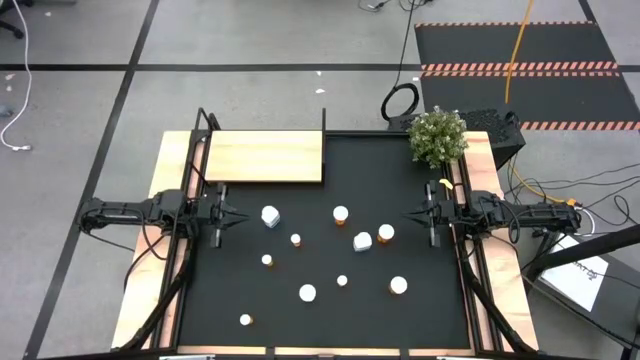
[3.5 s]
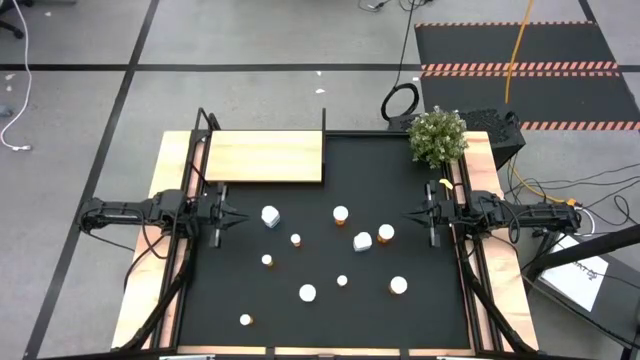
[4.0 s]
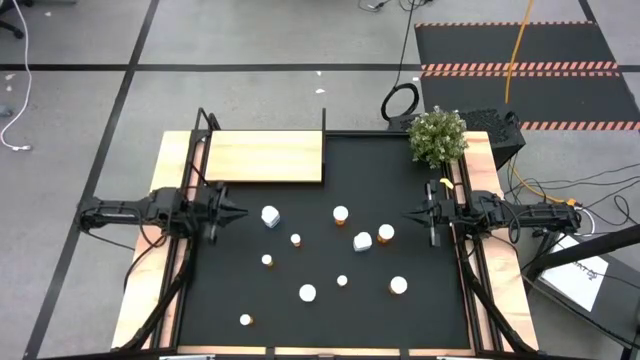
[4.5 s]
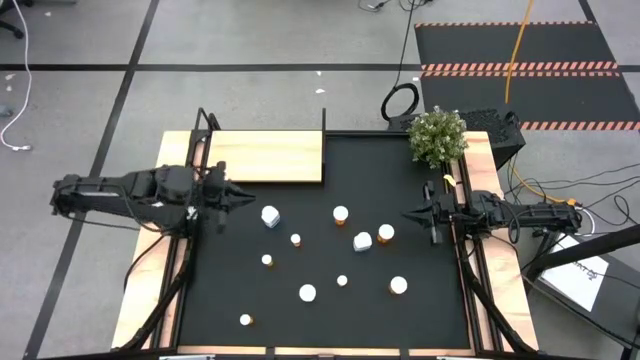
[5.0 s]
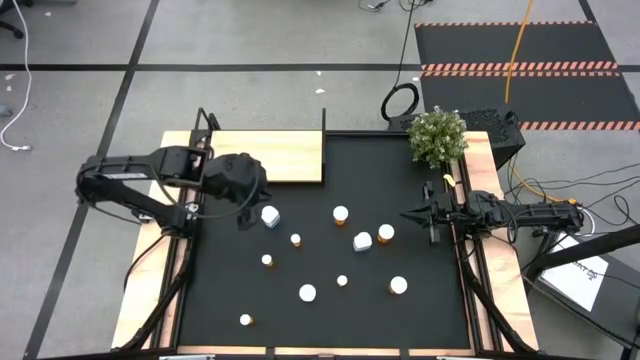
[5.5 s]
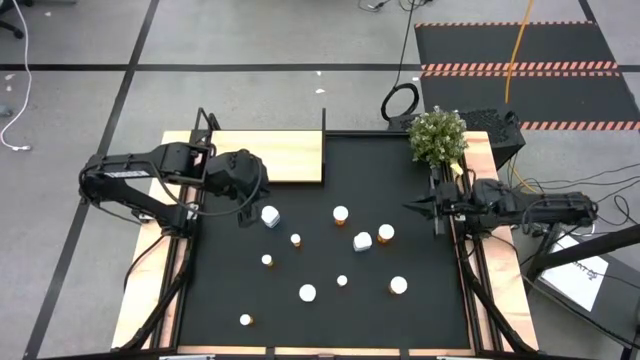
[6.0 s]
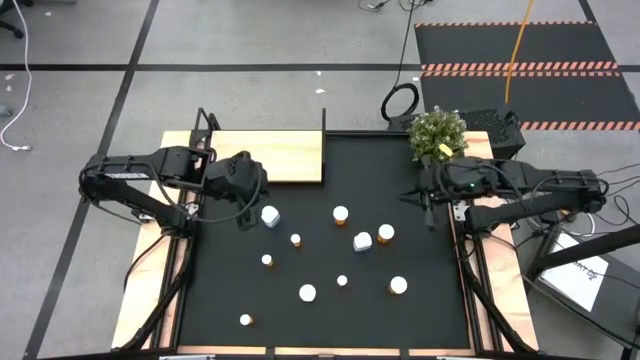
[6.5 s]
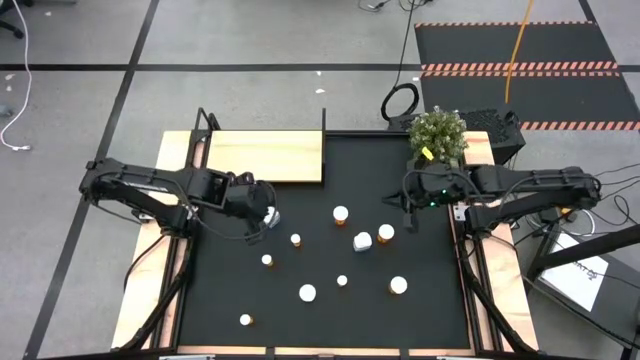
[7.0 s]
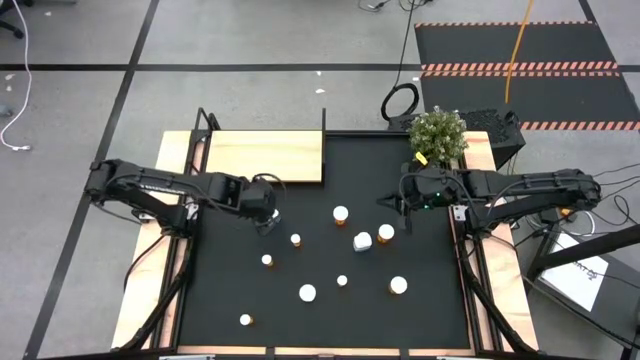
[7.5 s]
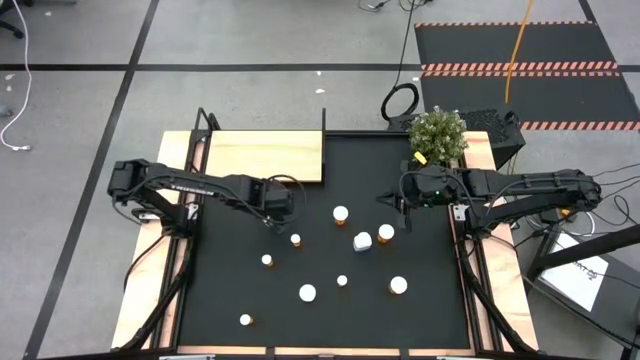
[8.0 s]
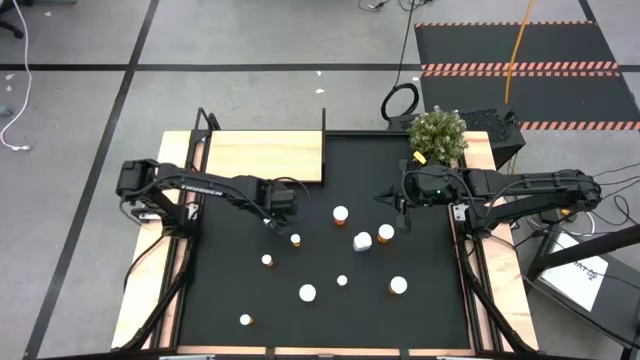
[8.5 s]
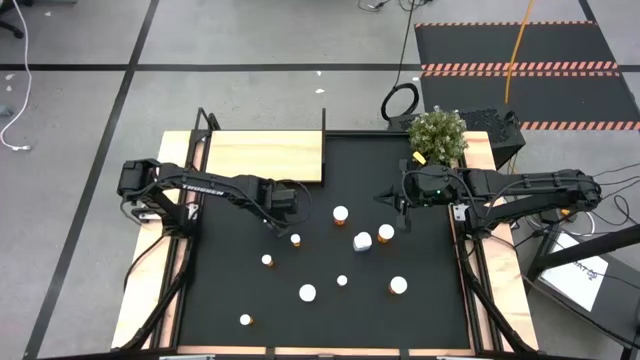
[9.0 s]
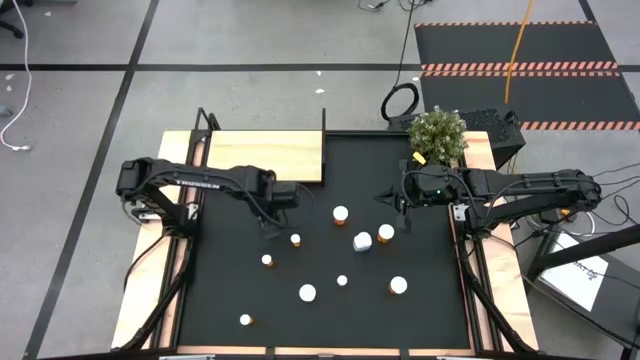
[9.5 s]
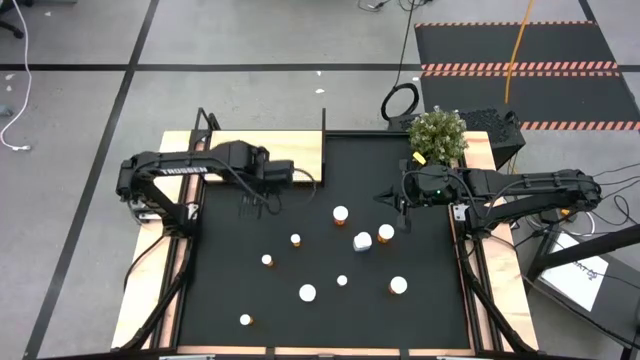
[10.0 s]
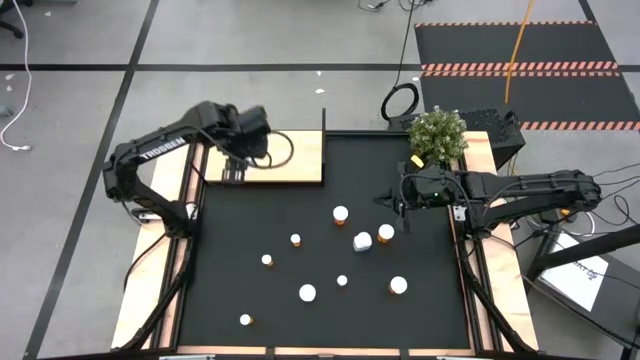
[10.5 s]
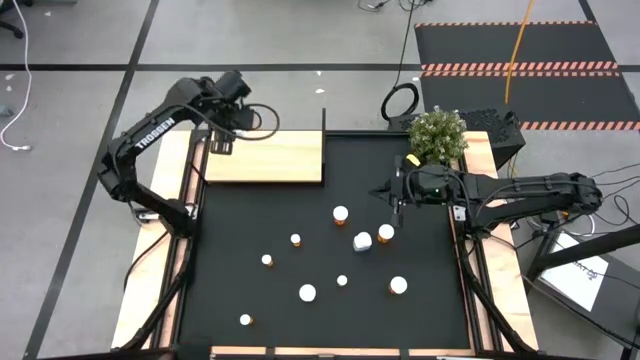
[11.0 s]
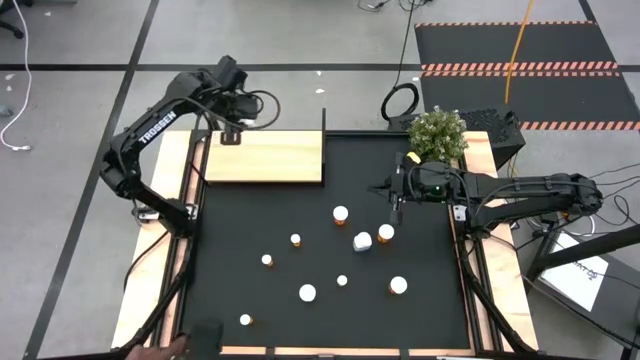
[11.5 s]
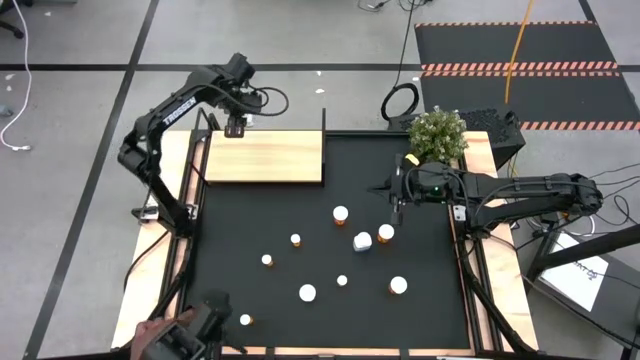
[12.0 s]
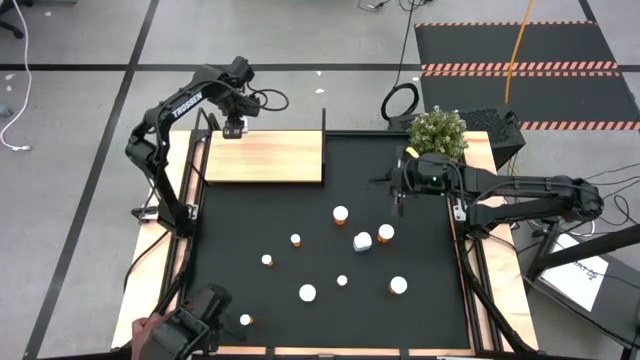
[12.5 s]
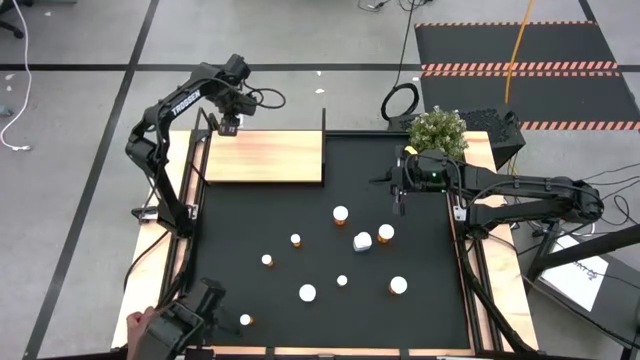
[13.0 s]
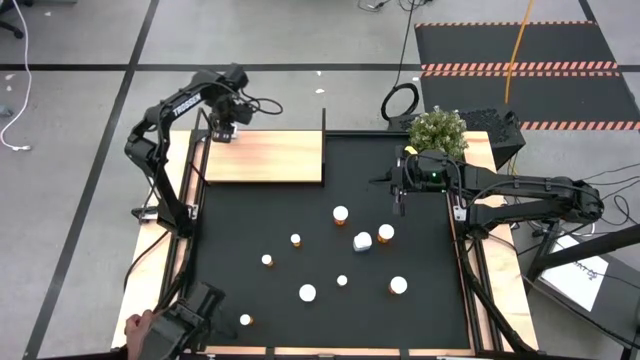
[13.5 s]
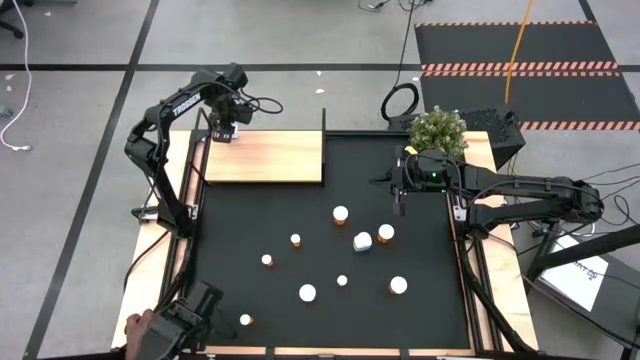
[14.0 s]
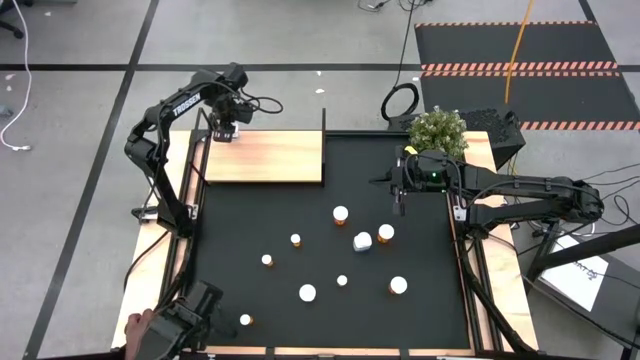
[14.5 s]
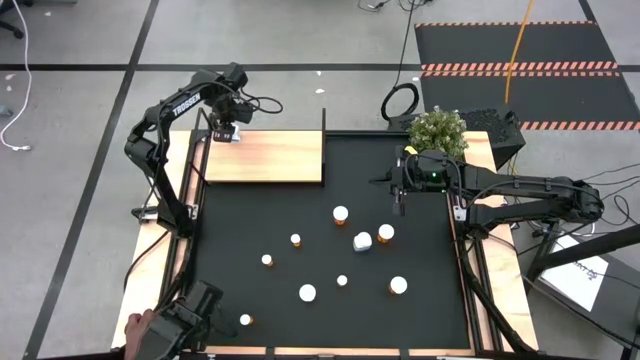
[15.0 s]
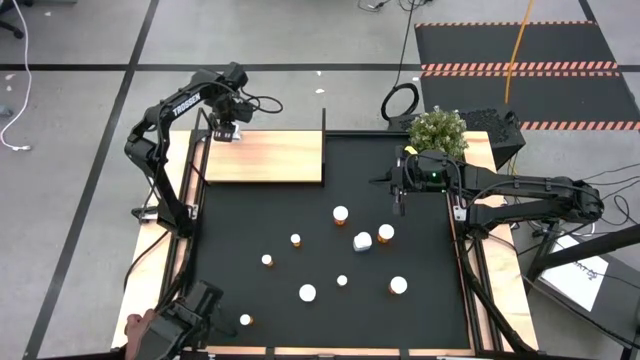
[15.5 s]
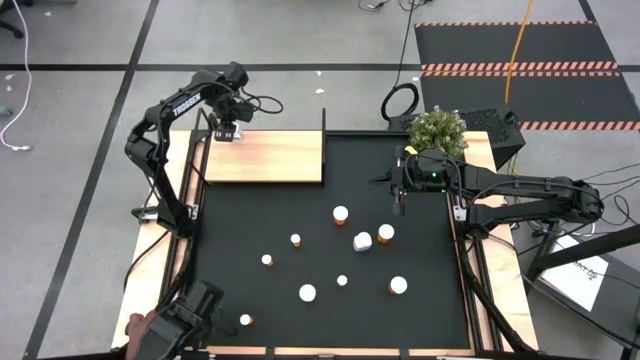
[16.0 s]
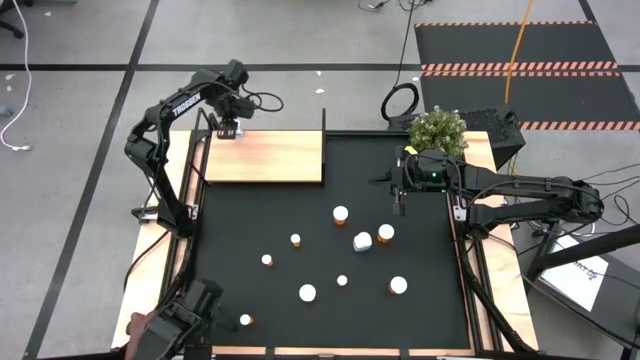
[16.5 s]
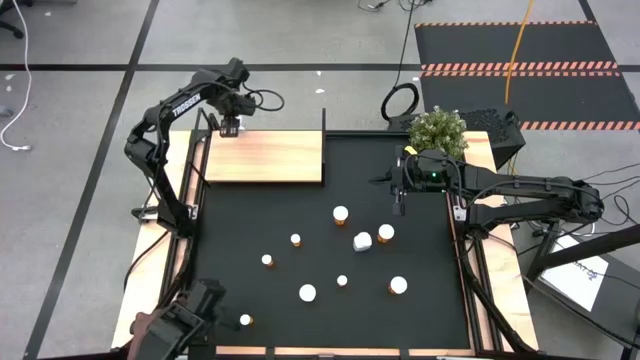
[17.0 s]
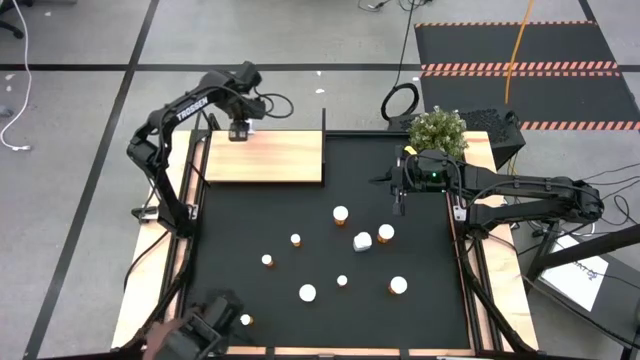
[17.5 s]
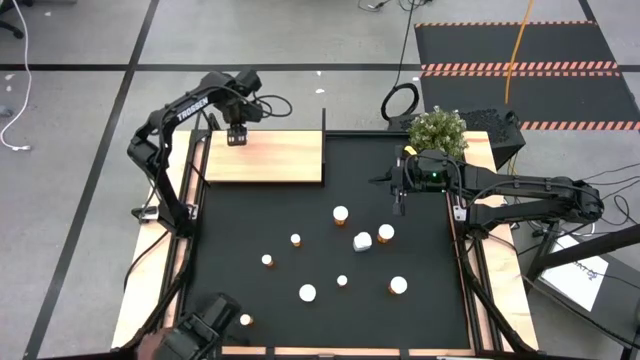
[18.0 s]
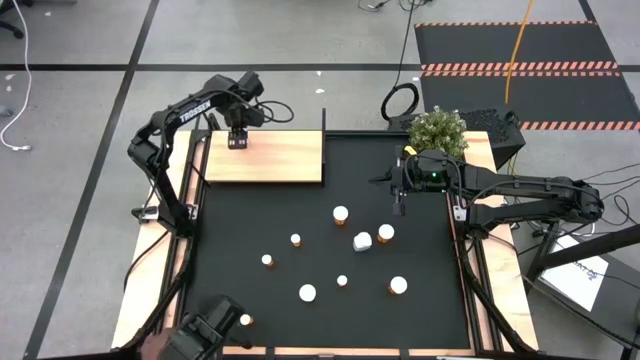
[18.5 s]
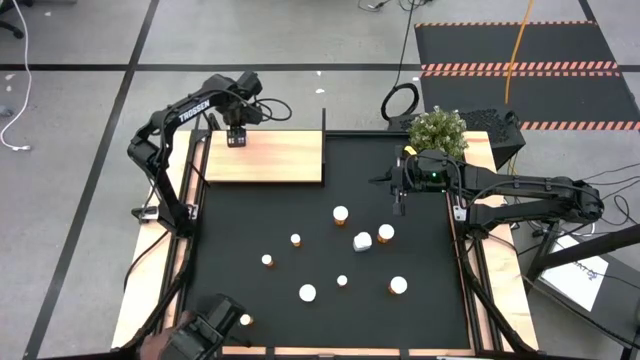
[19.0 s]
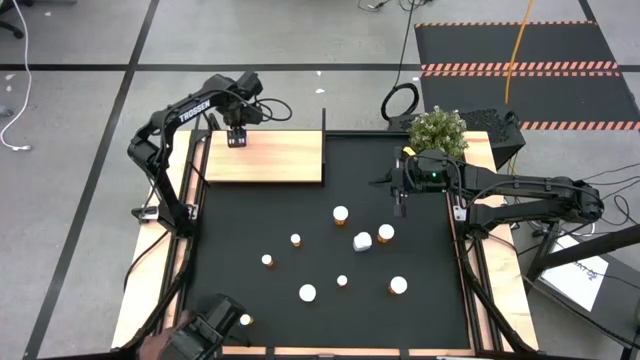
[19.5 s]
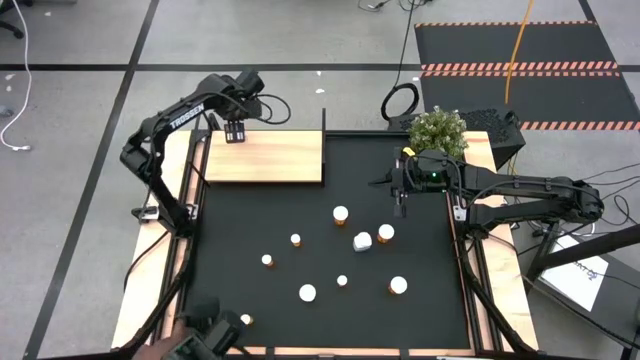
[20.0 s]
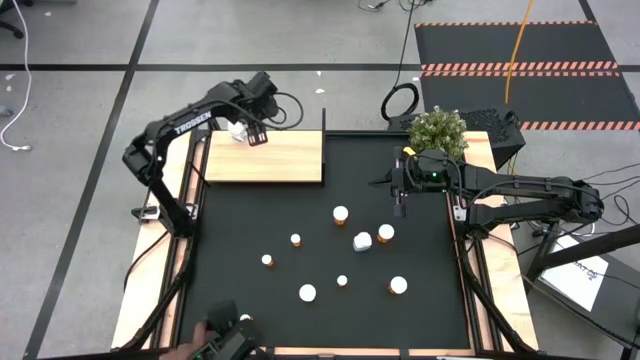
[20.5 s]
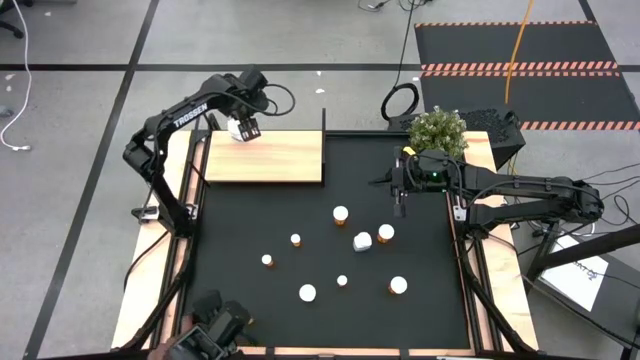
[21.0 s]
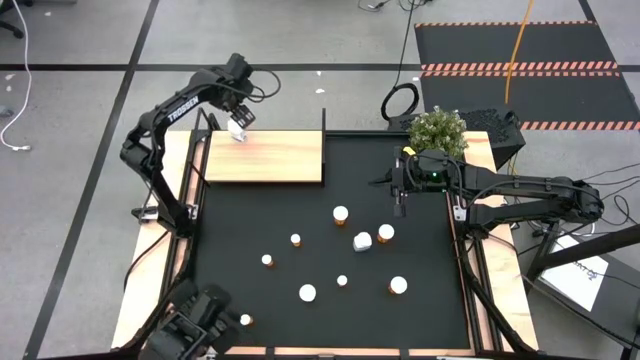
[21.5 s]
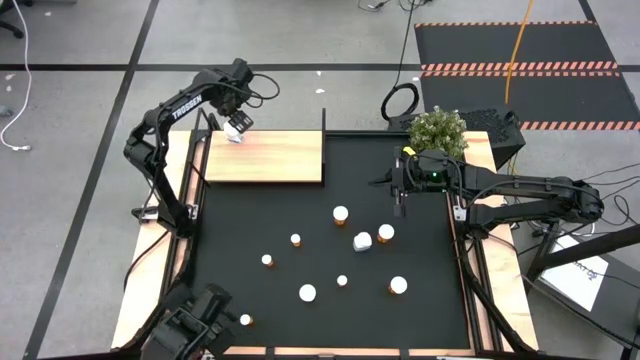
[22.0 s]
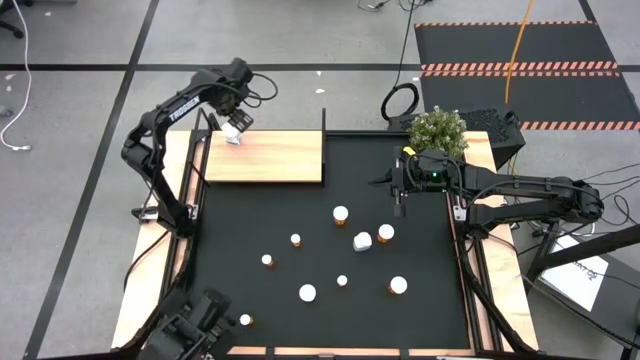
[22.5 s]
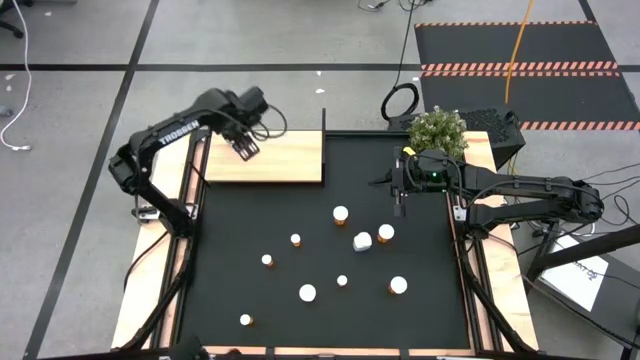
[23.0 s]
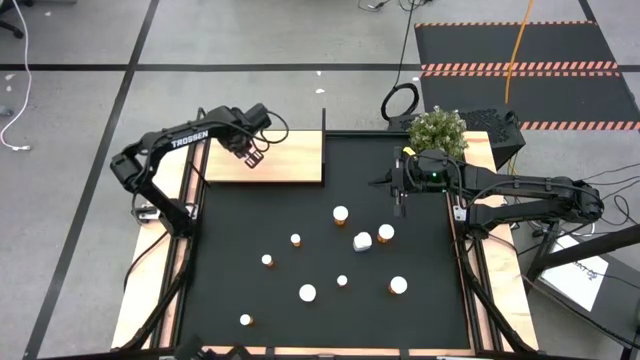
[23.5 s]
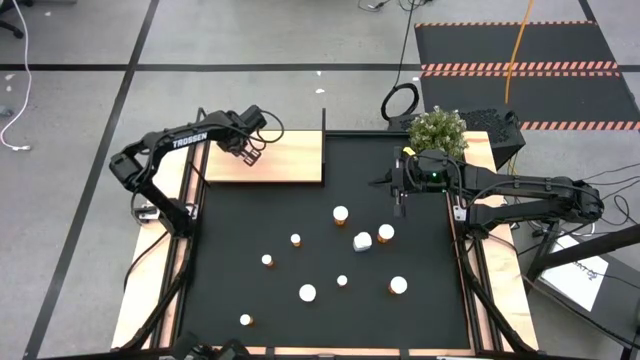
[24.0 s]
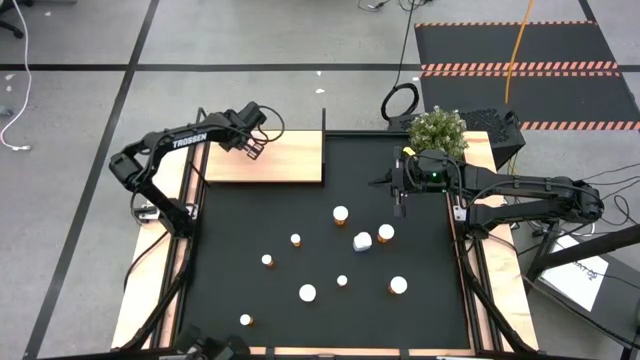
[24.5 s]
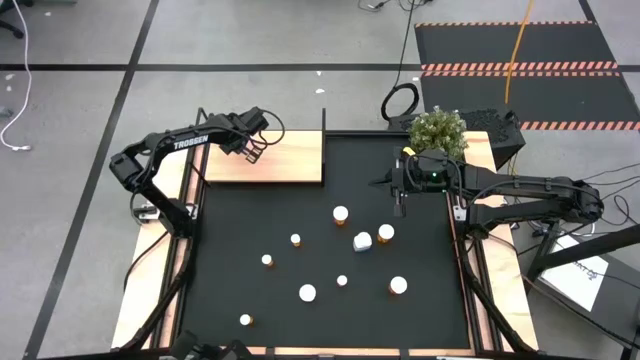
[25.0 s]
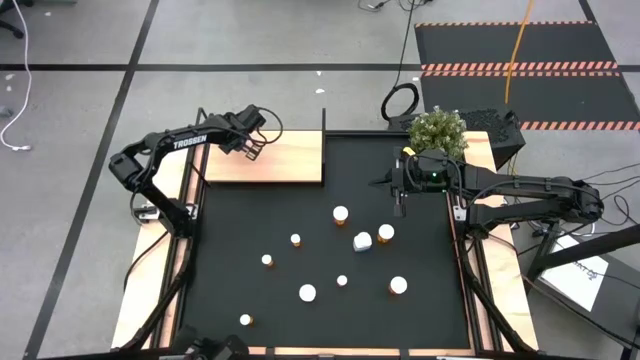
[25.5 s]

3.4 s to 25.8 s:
Task: Pick and place medicine bottles onto shelf by color
Put the white pill bottle on the shelf
